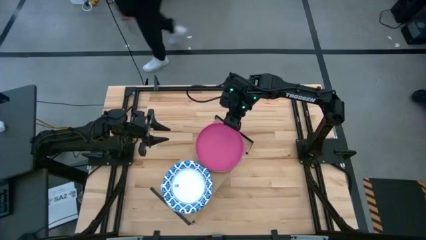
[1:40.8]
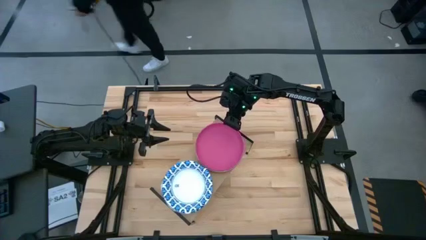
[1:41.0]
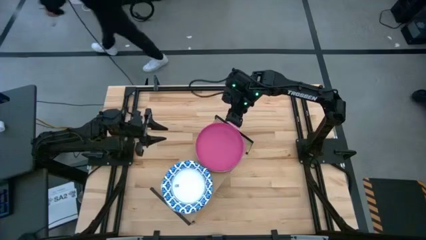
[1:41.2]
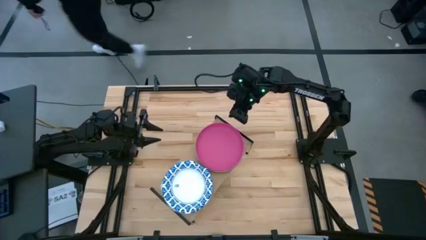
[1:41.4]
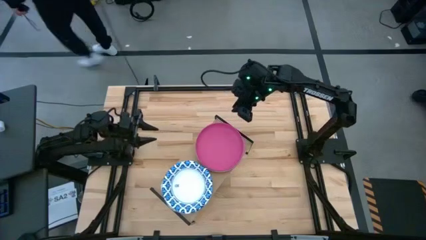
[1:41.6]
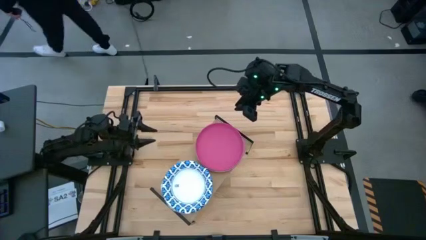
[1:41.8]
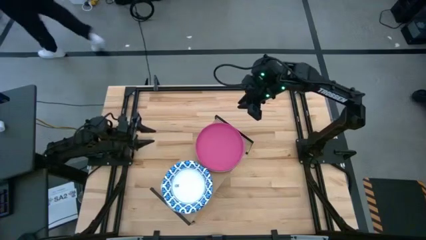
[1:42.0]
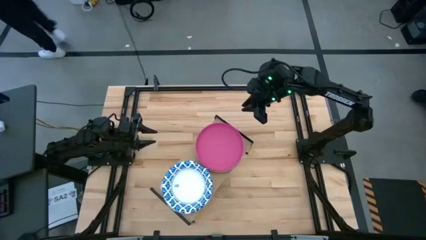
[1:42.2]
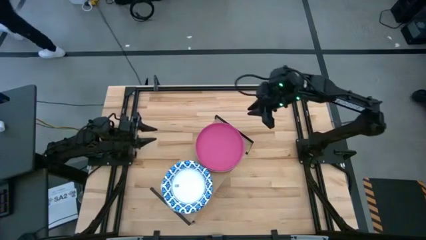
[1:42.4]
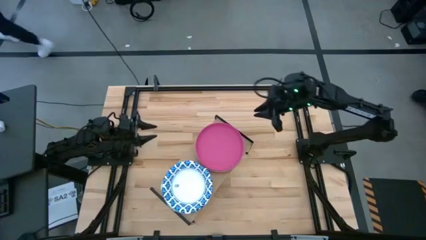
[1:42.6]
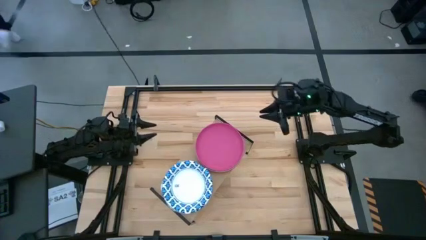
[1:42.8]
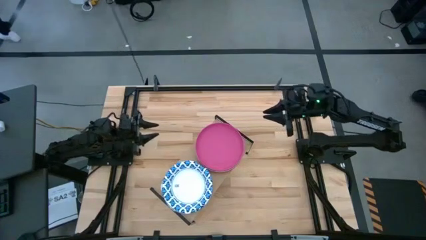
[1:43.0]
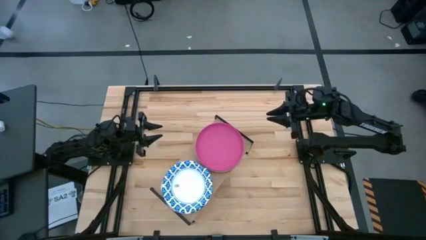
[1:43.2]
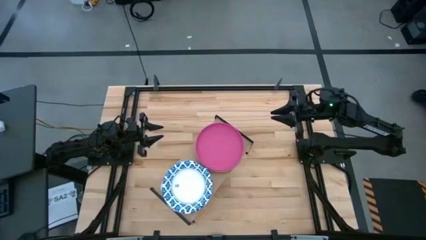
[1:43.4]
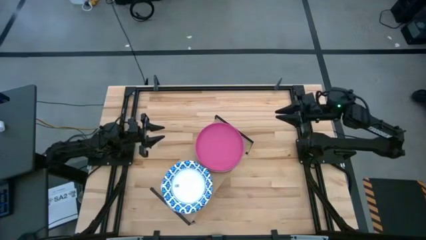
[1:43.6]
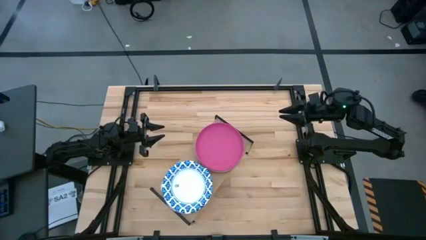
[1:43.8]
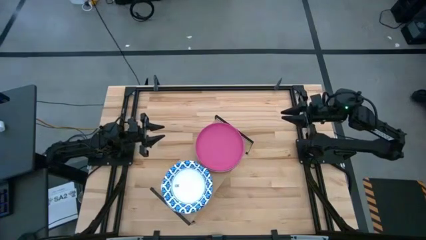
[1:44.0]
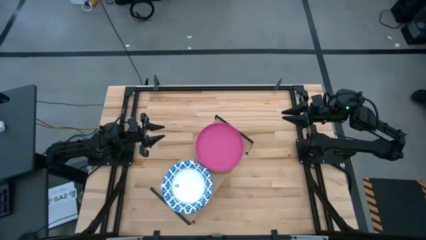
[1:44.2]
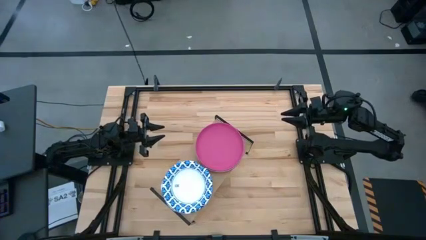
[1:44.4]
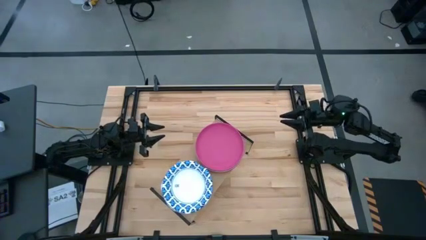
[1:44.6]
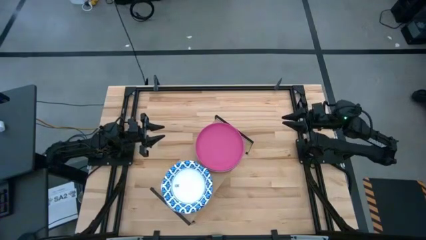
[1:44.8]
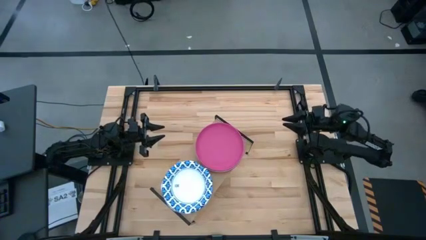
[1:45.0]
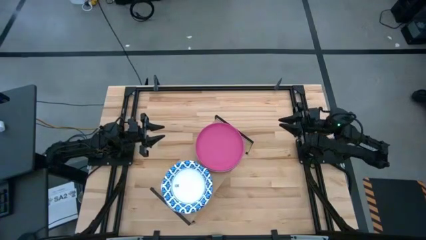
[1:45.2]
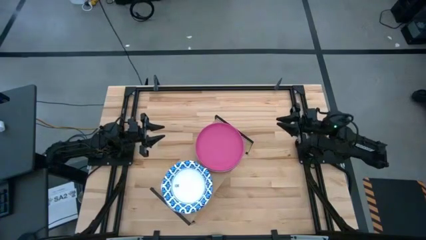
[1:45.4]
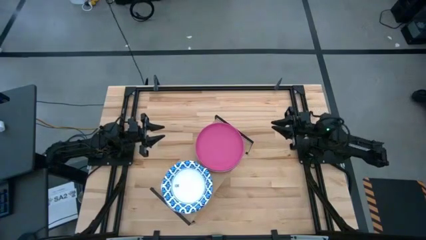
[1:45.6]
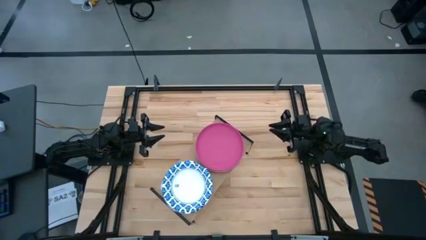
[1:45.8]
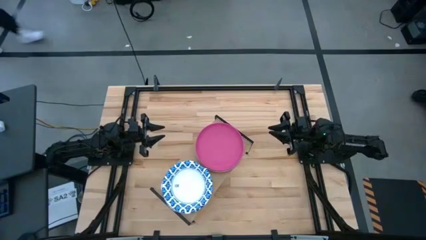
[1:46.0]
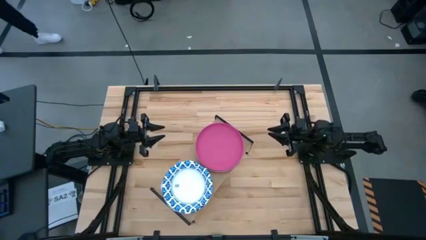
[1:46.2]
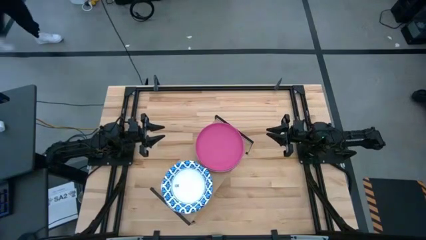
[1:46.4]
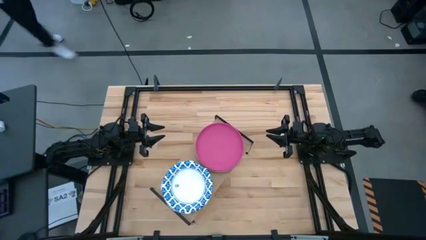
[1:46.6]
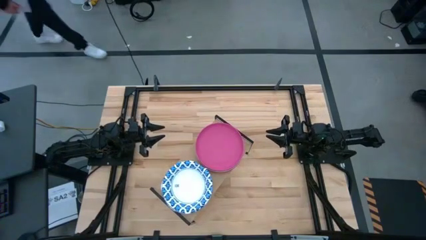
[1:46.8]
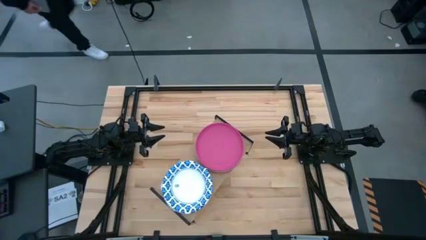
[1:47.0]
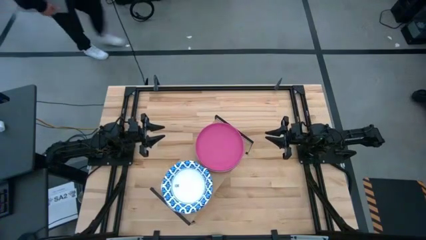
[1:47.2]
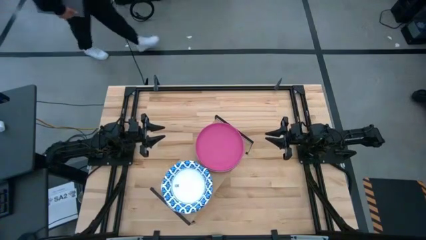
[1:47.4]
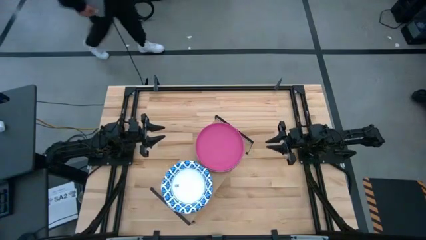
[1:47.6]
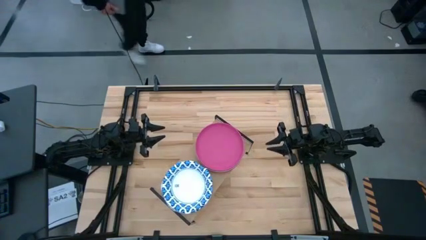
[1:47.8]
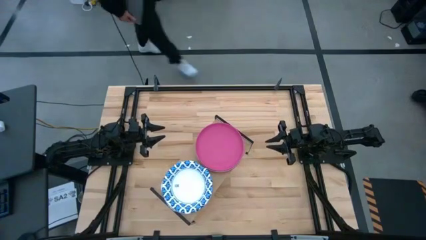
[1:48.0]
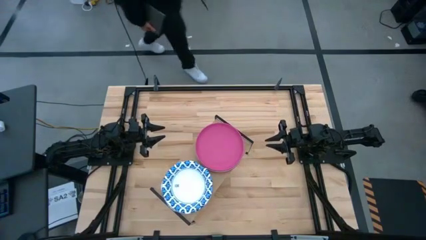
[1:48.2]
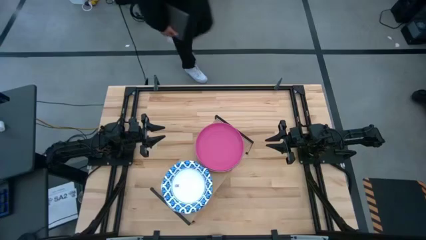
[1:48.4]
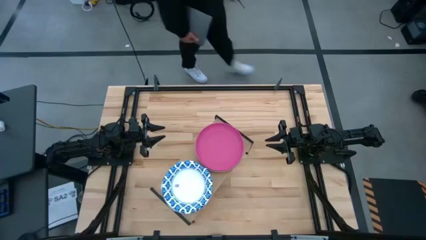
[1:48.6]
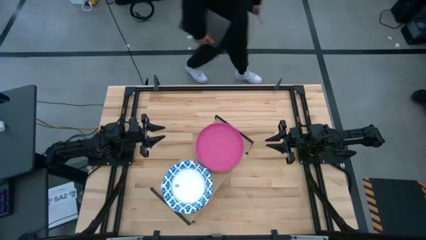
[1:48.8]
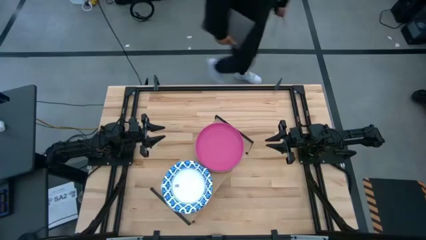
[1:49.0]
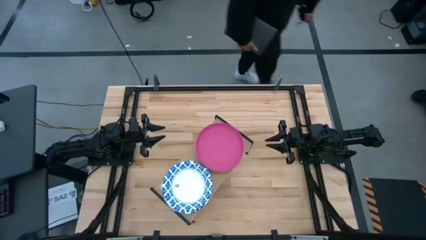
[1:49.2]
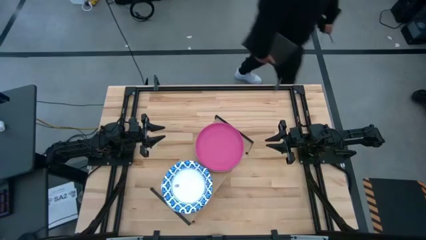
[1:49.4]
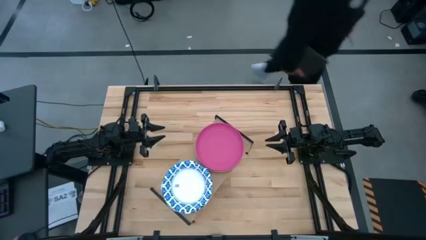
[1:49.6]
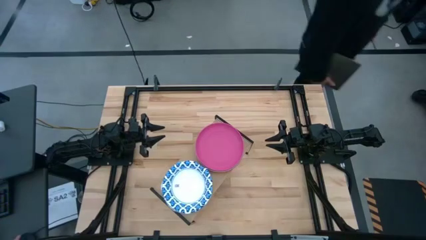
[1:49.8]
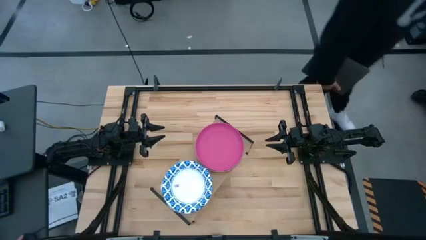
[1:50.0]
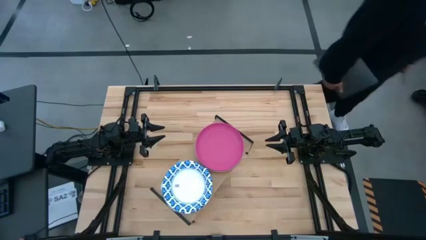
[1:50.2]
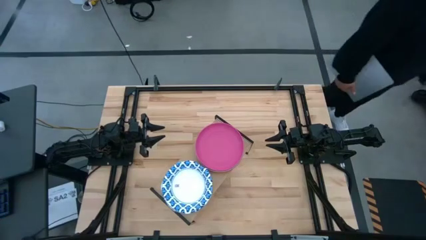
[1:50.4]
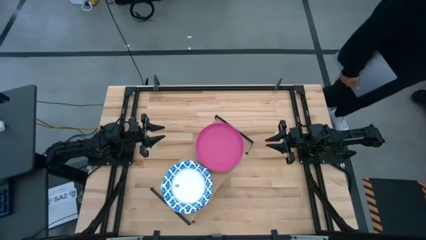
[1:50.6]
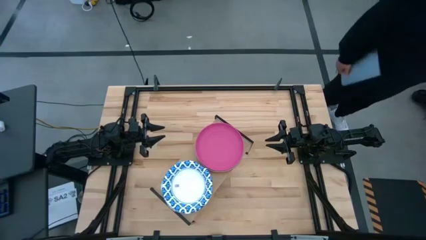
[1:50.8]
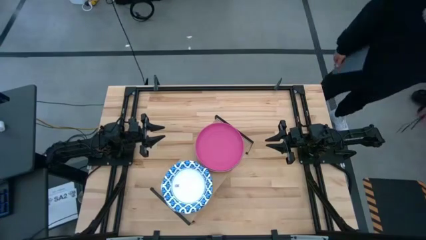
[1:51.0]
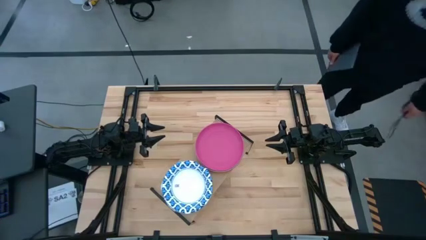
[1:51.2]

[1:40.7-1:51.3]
Task: Place and stack plates onto a shelf
Return to Home Position

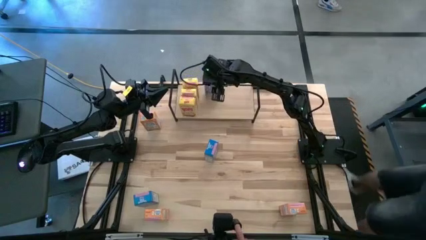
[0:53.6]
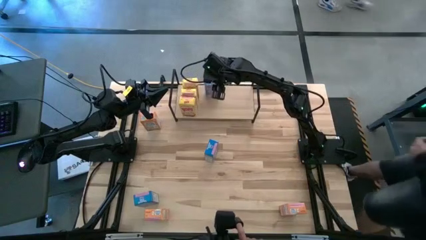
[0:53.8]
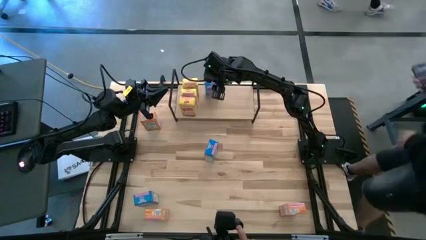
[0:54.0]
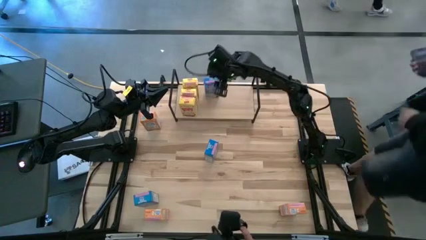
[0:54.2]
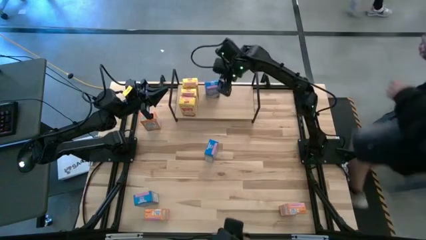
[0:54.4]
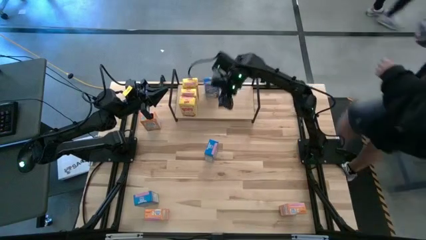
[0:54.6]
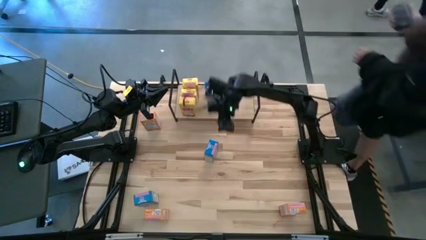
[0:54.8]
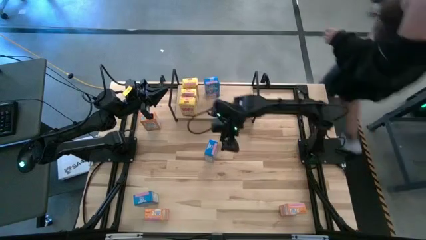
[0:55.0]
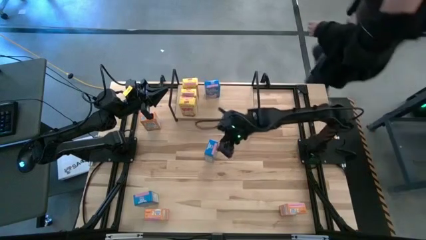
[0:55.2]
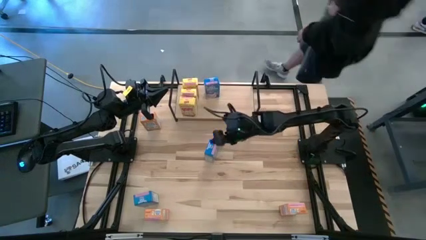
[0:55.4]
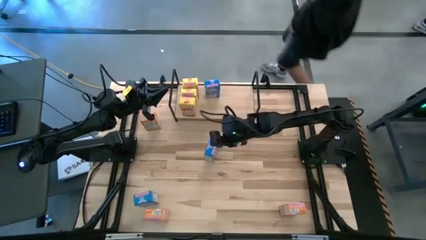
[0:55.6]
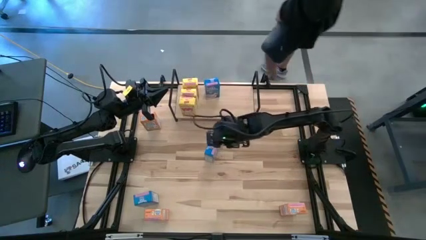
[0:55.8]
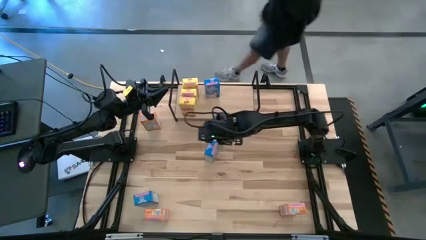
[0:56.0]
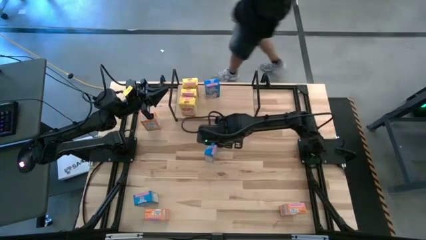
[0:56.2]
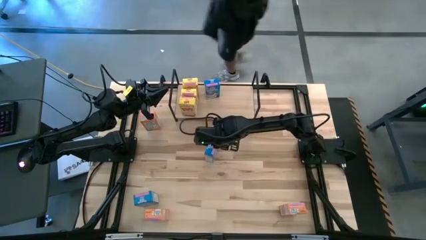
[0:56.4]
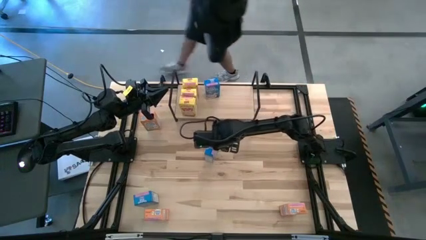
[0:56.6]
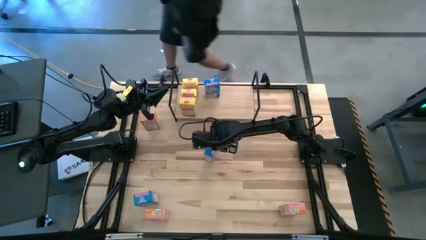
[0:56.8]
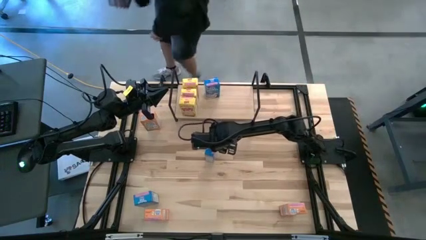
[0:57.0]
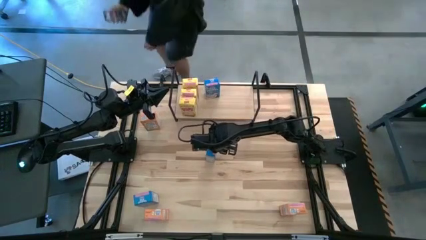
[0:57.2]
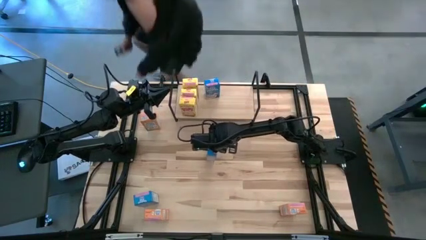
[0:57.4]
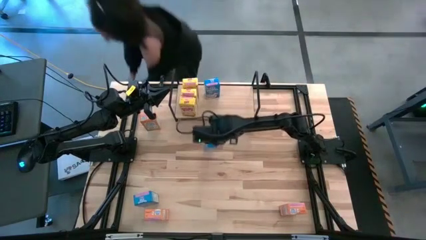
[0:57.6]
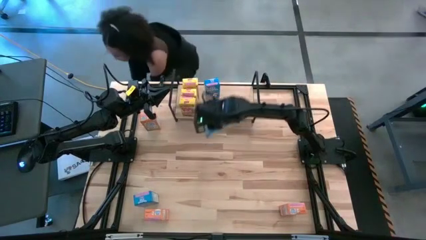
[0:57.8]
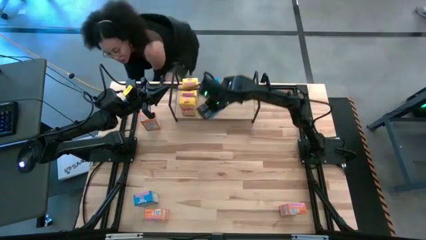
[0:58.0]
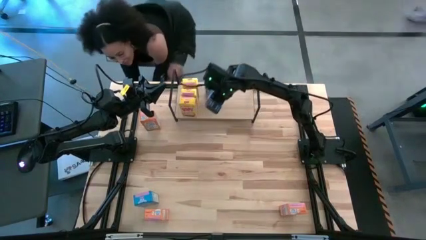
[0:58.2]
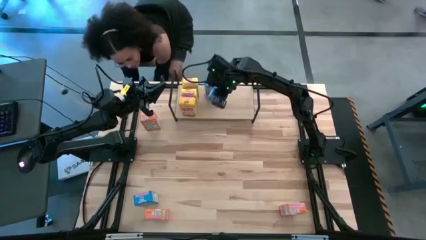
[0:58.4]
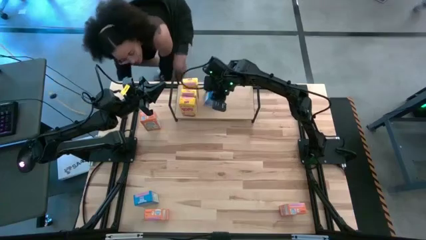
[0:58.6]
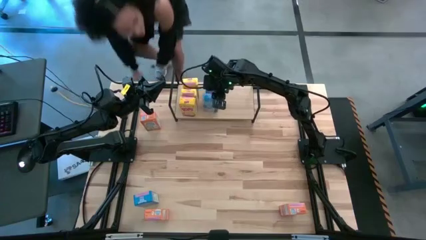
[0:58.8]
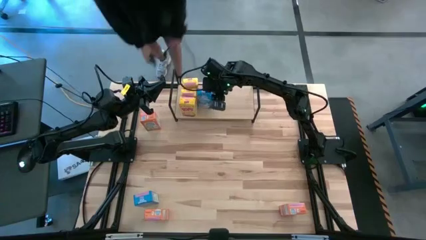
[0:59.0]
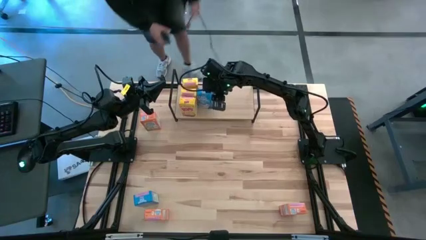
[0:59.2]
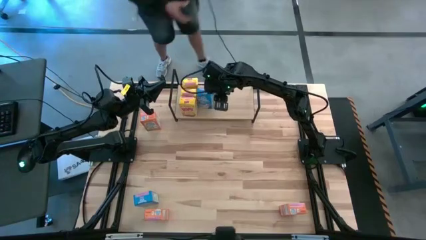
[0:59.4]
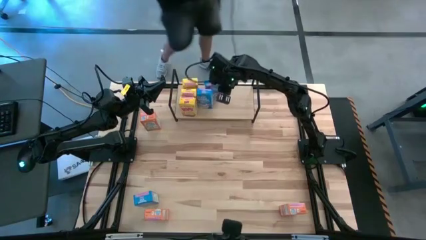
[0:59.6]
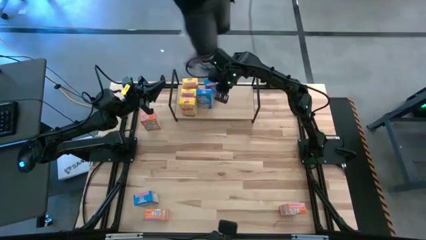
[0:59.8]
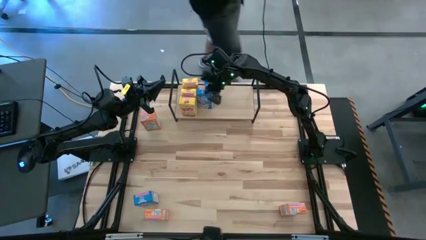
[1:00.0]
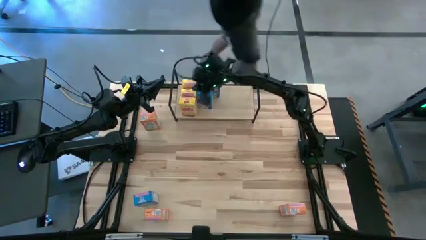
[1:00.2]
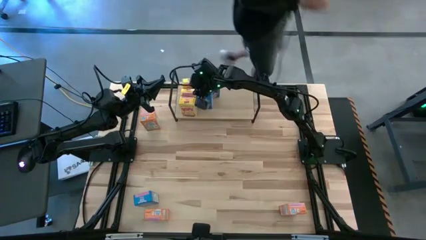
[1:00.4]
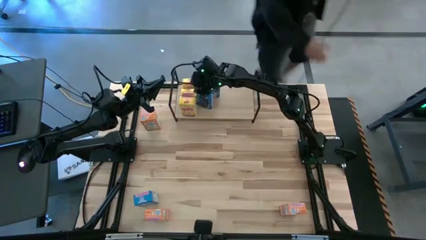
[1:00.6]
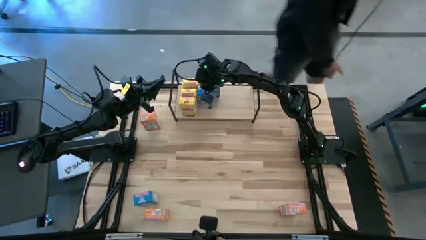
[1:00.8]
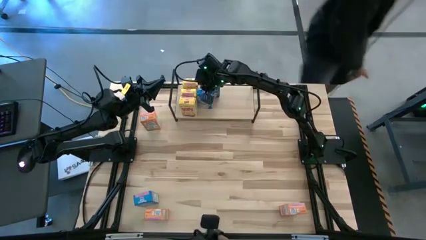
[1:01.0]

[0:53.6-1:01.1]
Task: Stack cereal on shelf
Put the top blue cereal box on the shelf aligned with the other blue cereal box
